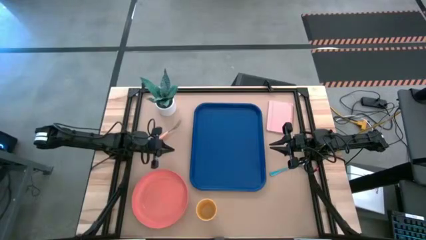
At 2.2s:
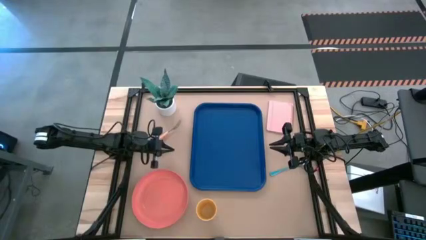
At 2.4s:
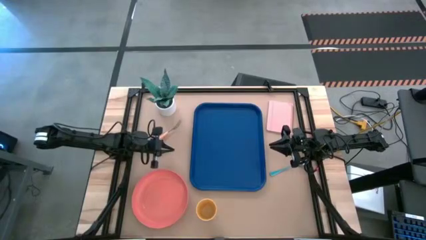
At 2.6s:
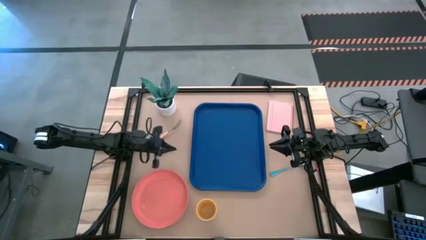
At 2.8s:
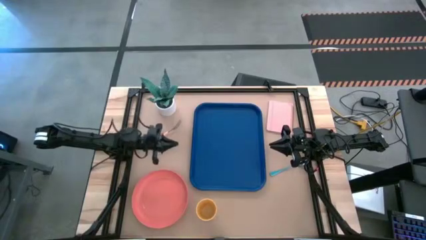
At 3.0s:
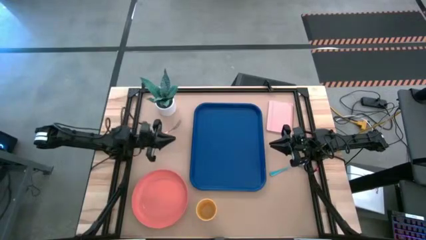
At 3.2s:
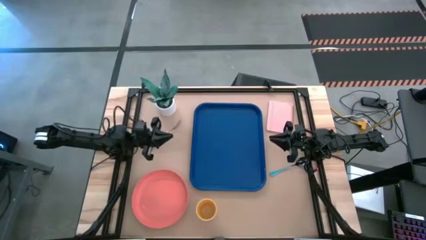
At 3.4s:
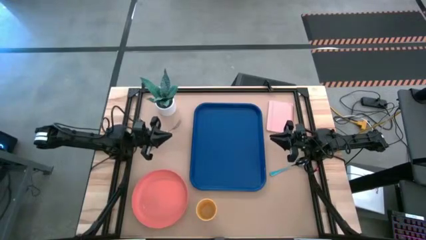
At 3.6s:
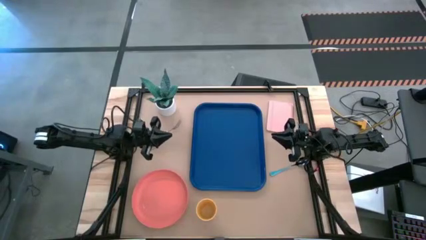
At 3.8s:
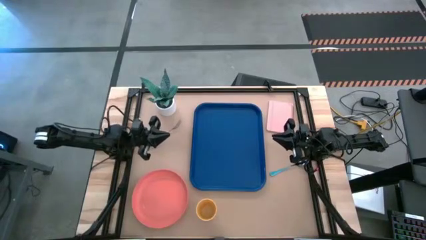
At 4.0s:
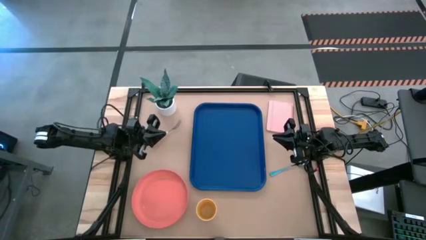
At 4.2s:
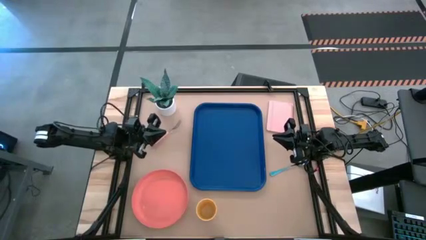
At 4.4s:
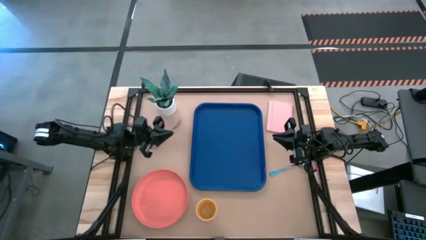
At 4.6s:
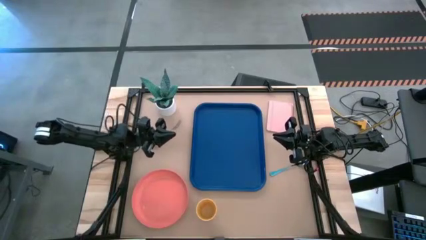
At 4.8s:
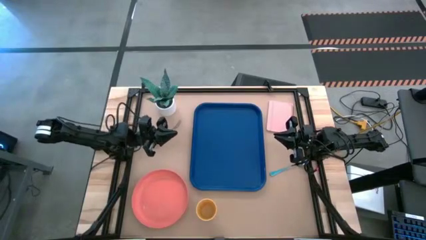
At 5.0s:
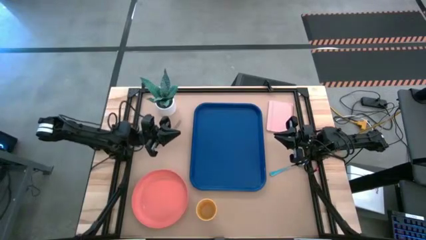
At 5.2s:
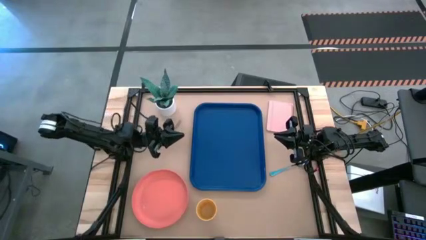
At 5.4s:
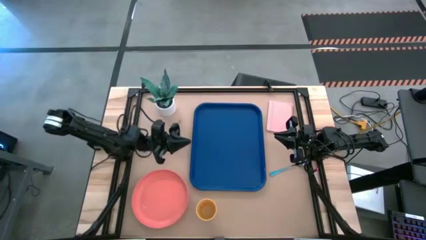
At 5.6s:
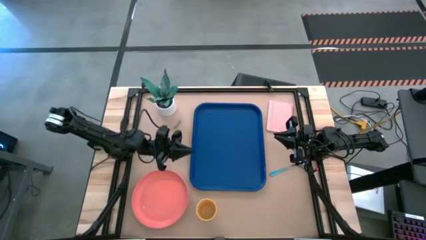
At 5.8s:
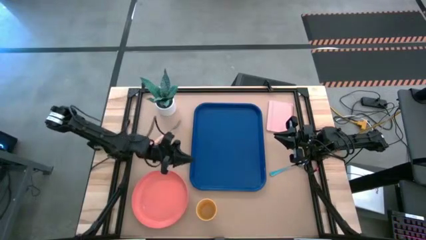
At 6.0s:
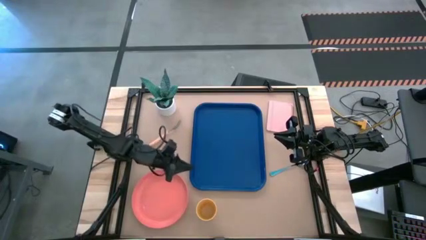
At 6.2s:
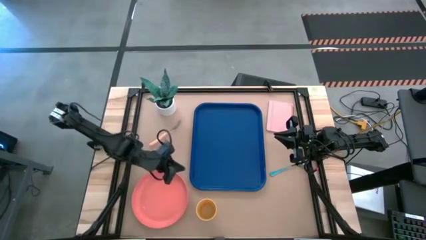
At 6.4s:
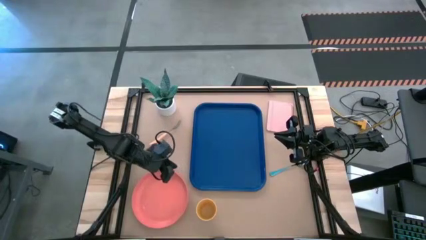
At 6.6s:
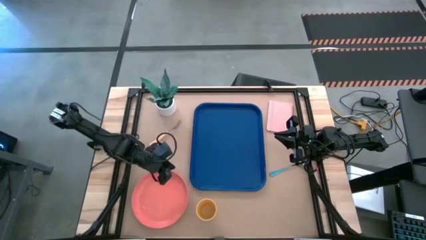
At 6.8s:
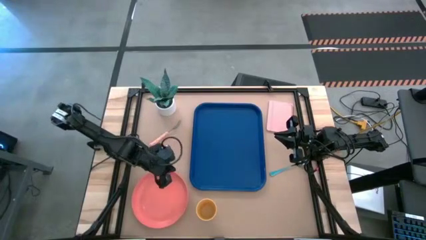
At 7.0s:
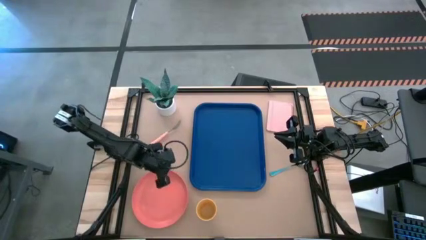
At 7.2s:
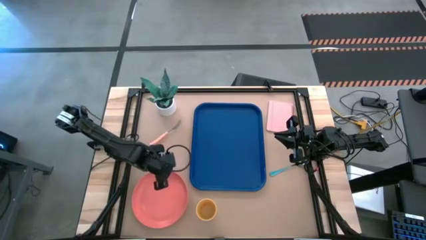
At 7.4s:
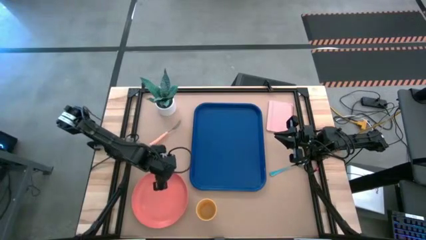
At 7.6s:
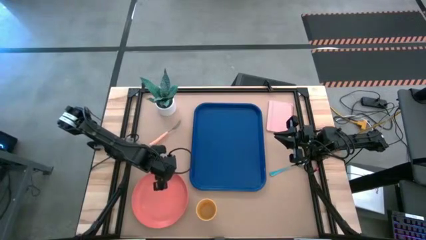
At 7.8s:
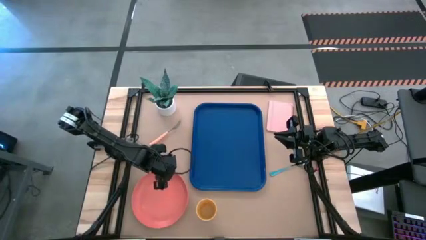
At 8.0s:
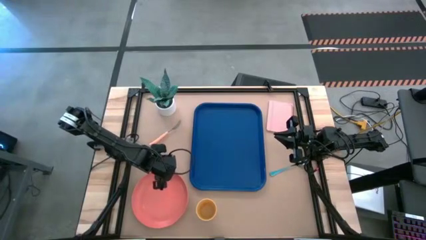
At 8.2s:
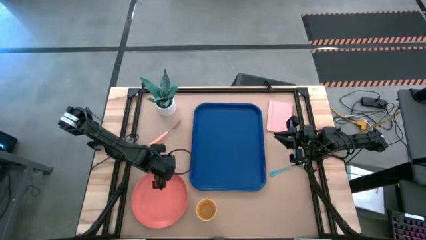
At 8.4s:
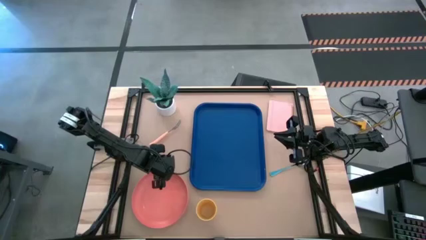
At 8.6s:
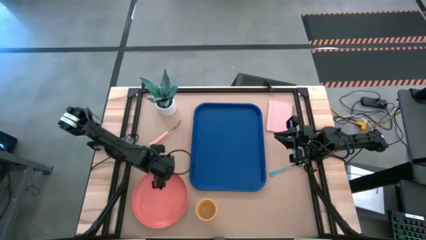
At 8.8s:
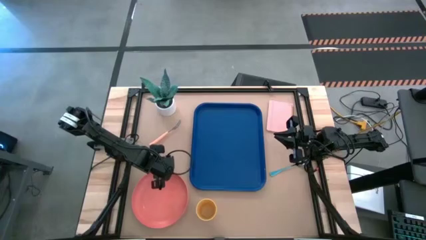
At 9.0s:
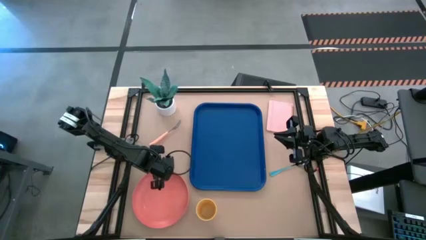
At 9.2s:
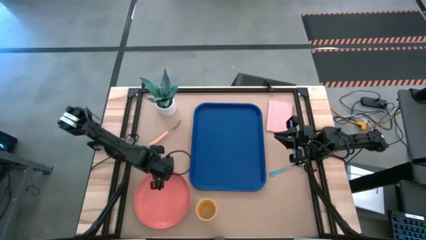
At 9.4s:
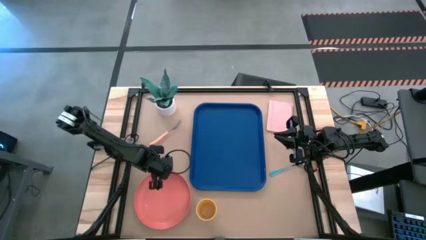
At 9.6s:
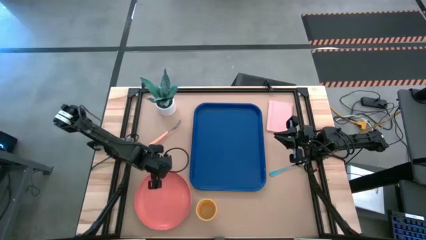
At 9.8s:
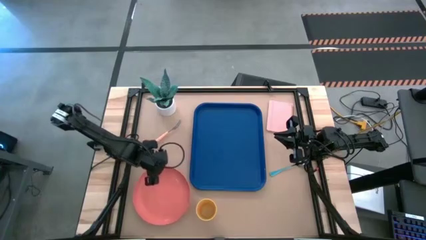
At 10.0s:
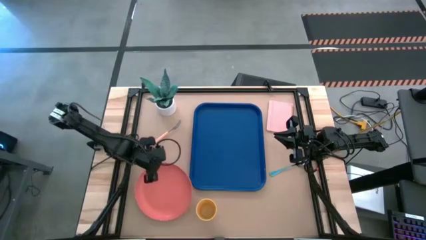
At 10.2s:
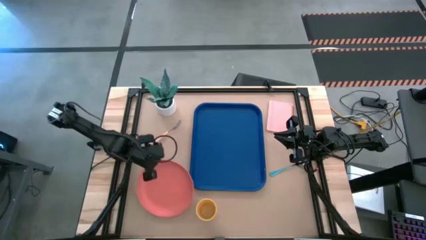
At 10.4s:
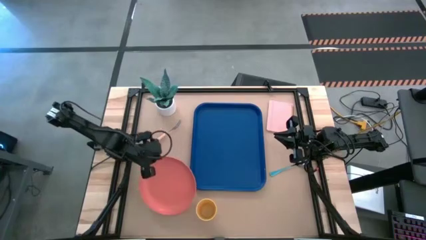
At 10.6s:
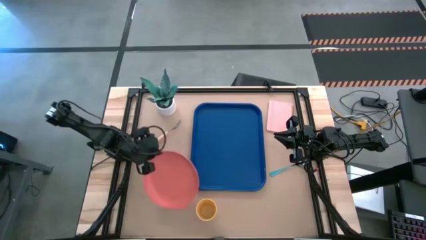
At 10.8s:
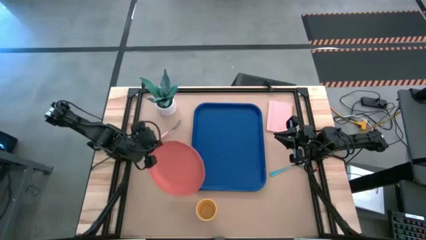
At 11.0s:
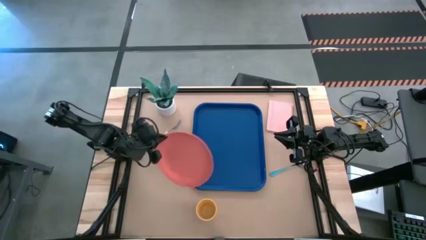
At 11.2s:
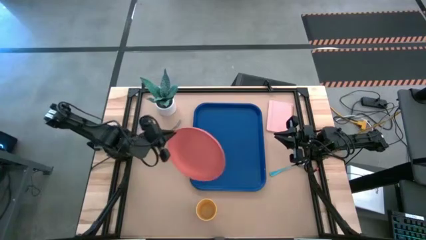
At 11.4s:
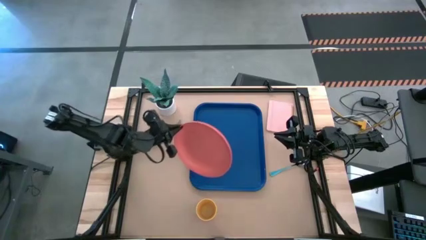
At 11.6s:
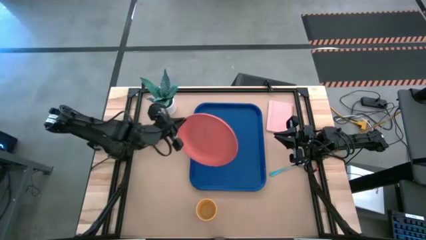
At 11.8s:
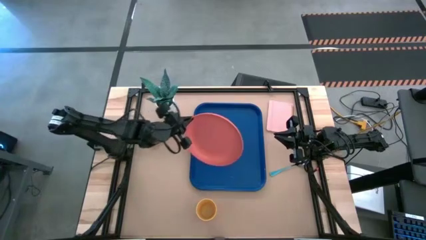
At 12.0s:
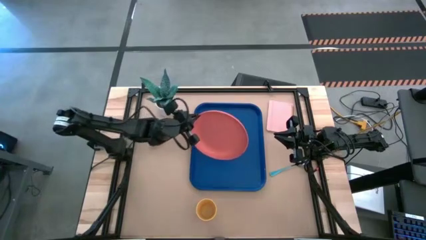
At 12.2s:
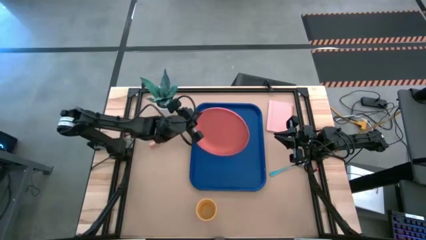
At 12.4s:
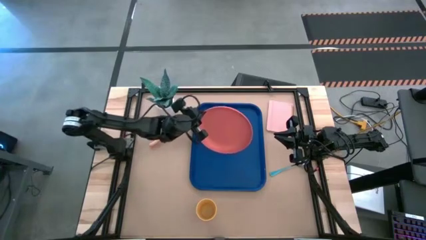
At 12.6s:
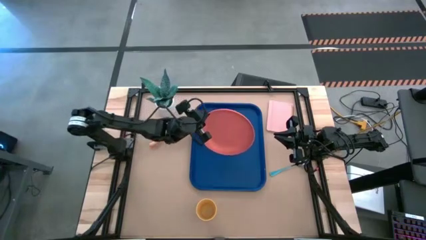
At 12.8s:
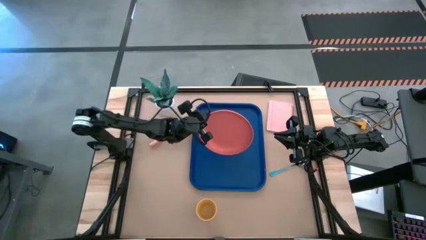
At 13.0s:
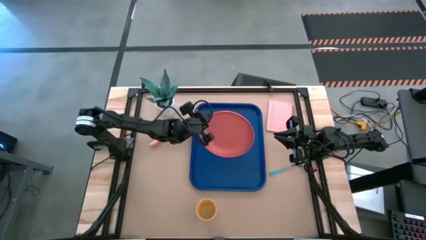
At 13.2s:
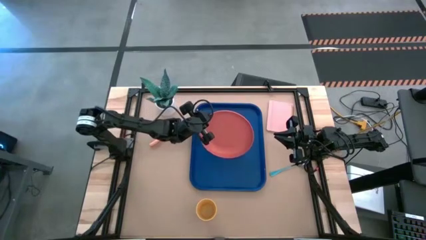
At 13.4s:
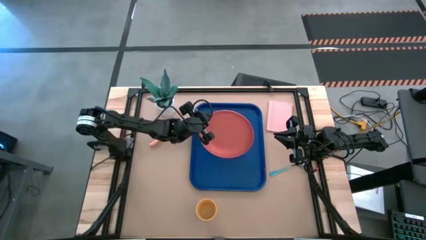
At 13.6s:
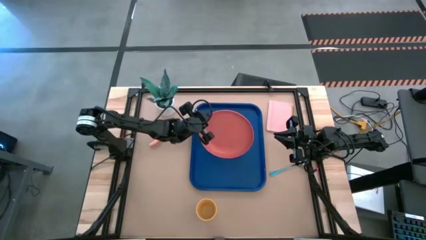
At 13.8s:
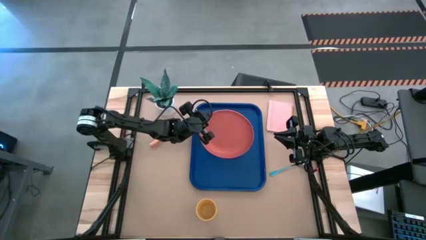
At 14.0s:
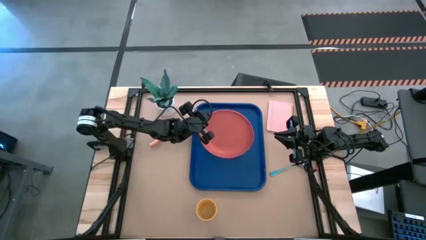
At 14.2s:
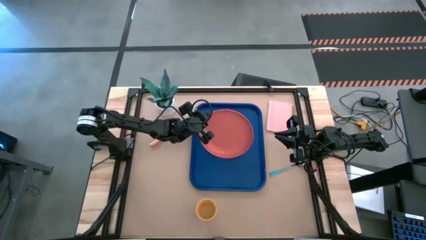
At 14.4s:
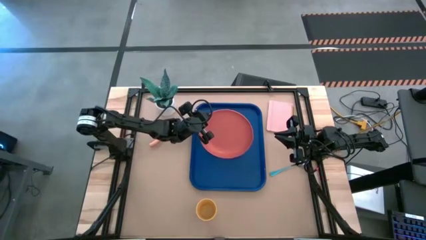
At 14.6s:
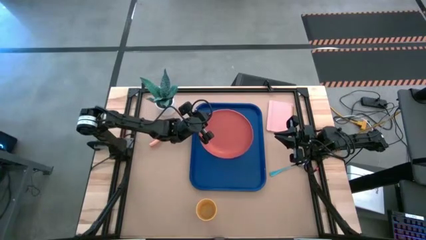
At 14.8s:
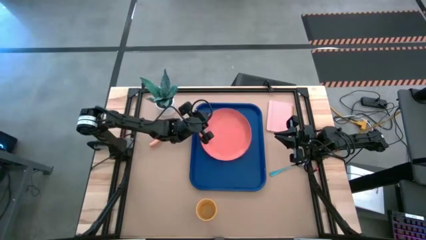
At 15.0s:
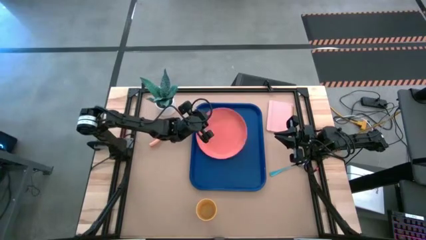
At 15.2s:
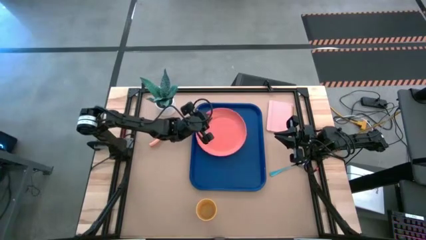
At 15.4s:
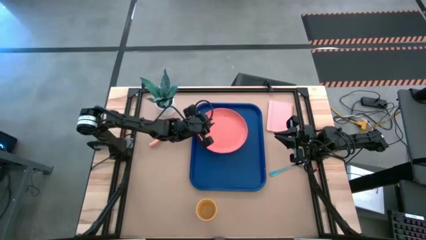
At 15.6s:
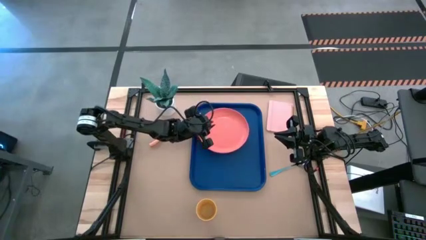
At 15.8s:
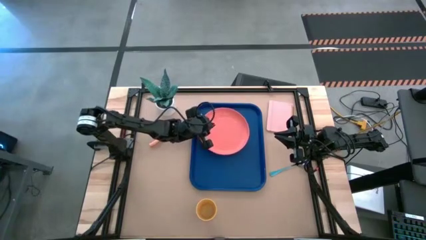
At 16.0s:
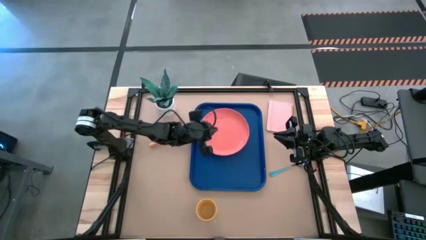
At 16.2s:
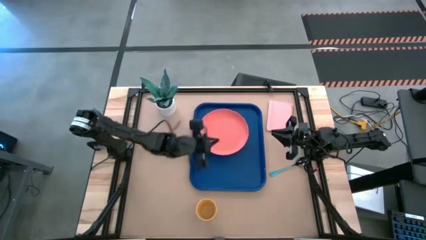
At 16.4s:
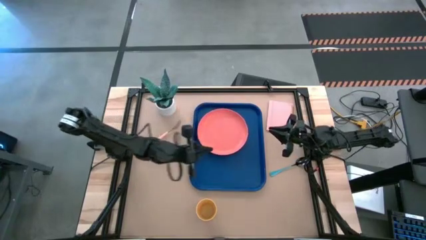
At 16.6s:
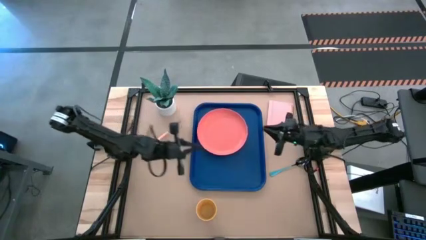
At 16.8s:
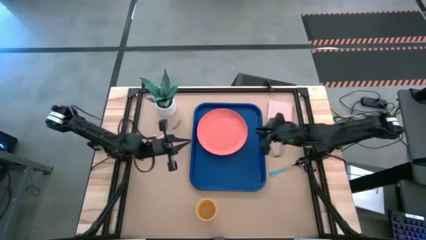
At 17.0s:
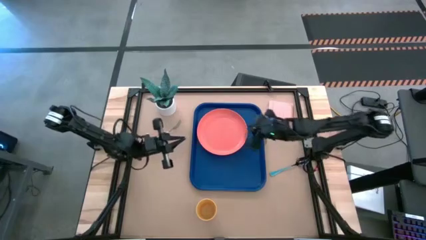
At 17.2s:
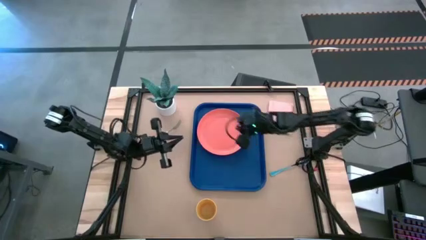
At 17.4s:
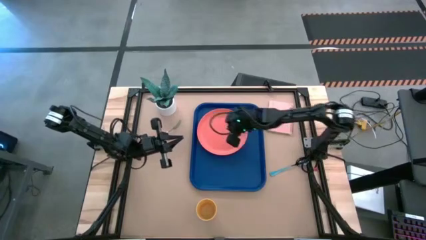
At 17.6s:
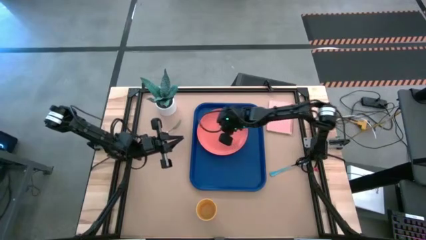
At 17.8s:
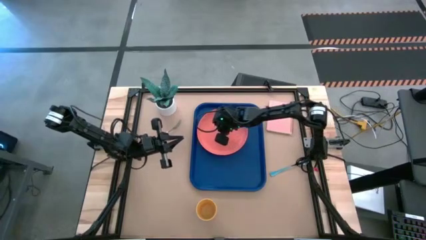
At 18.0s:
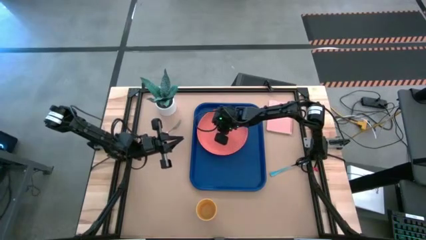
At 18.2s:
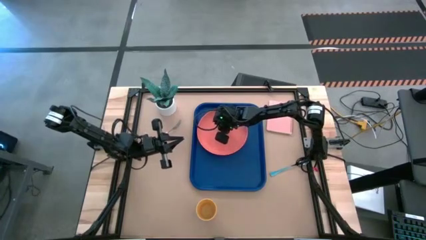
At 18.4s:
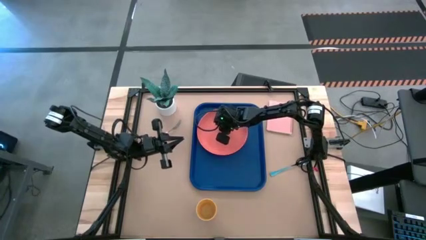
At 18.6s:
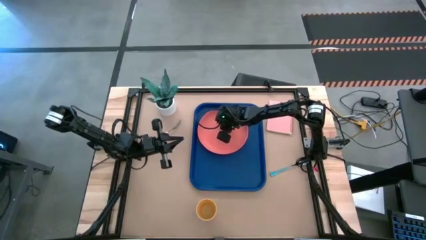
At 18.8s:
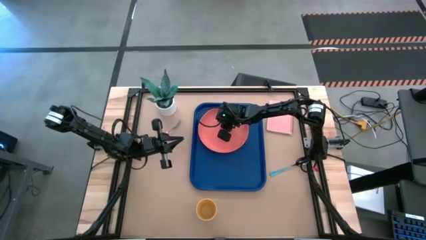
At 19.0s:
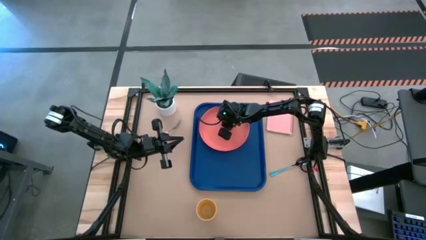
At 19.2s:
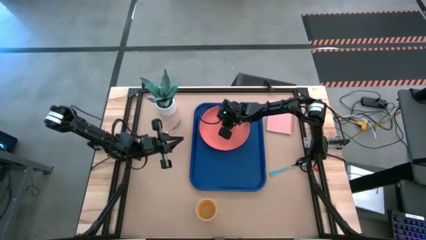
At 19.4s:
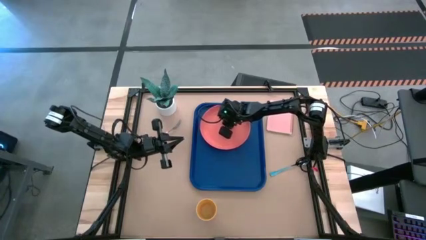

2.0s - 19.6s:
Task: Pick and place plate/cup/fork/spoon on tray
Put the orange plate on the blue tray
